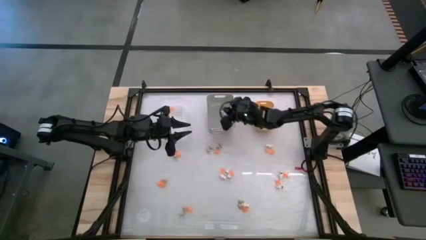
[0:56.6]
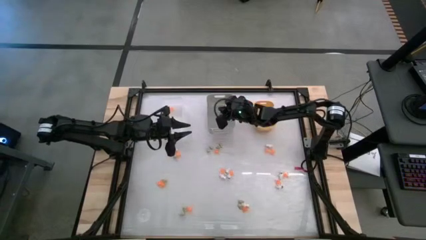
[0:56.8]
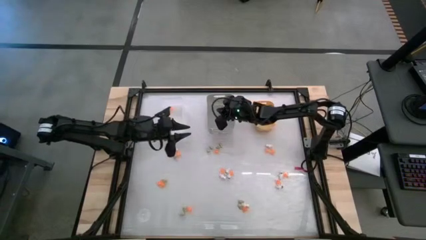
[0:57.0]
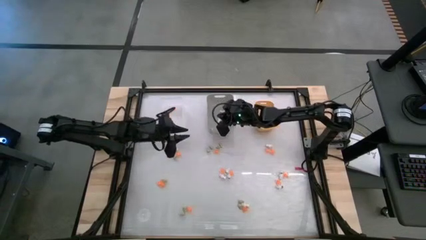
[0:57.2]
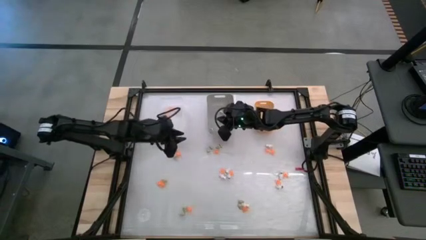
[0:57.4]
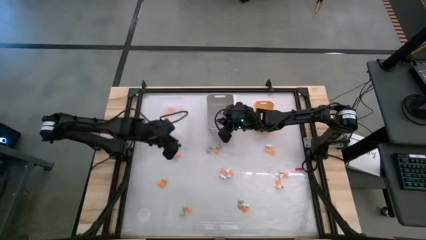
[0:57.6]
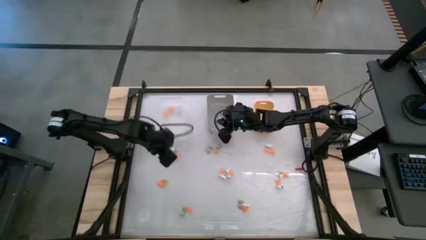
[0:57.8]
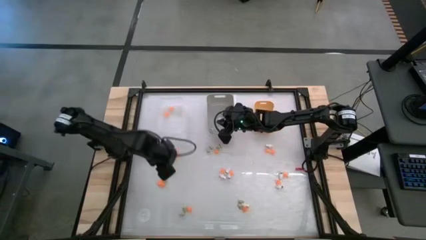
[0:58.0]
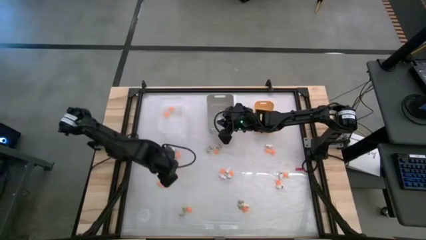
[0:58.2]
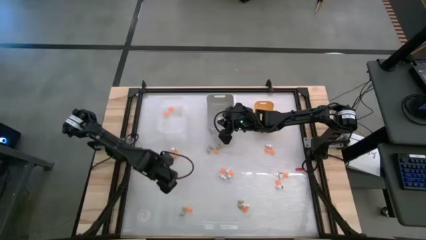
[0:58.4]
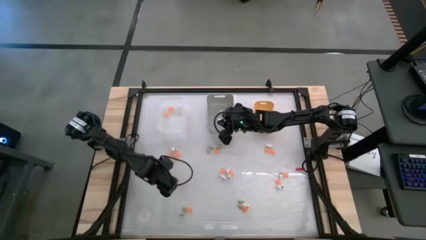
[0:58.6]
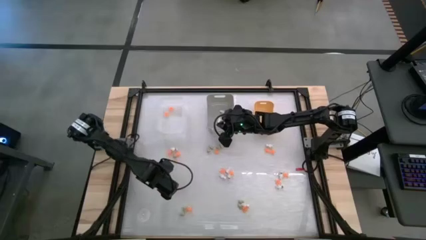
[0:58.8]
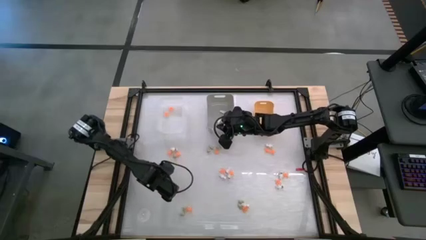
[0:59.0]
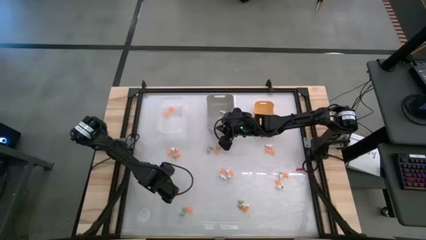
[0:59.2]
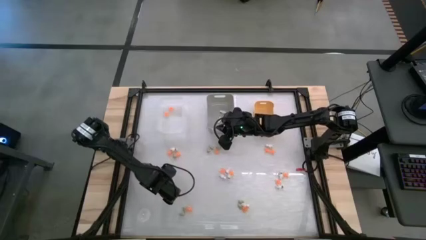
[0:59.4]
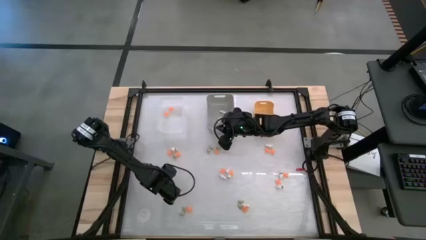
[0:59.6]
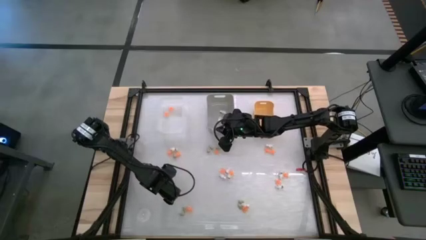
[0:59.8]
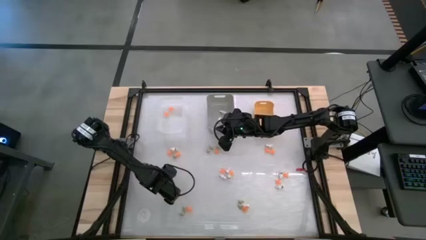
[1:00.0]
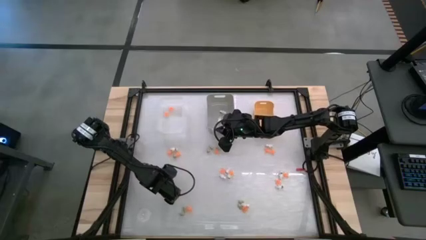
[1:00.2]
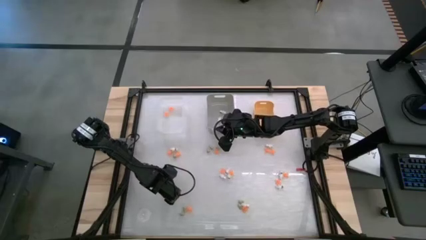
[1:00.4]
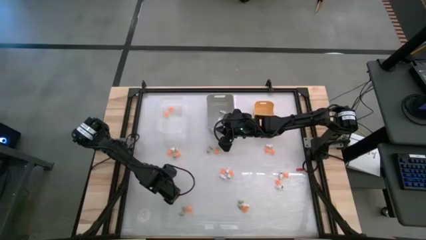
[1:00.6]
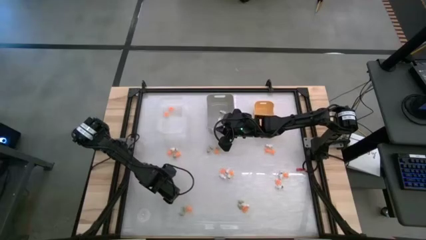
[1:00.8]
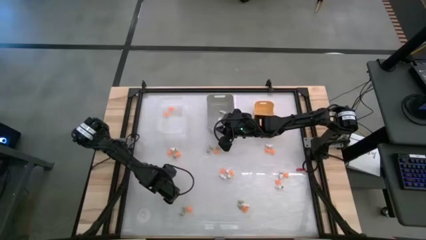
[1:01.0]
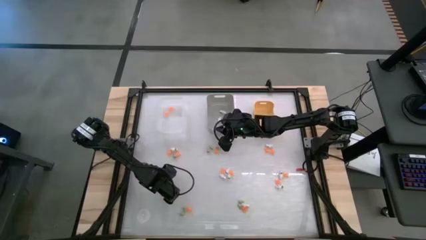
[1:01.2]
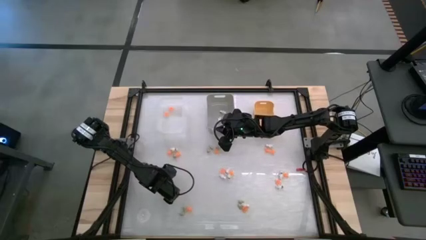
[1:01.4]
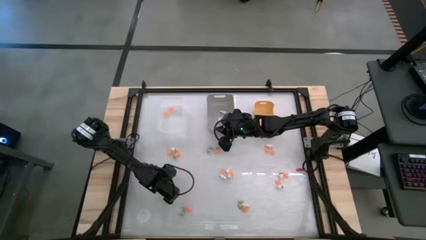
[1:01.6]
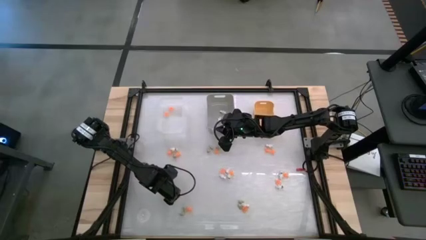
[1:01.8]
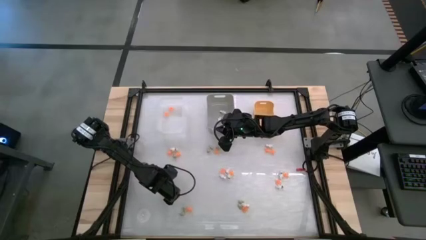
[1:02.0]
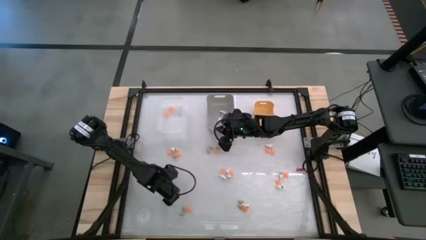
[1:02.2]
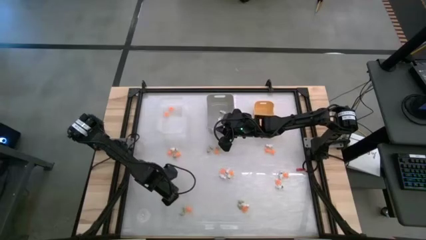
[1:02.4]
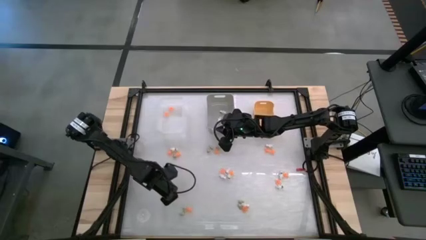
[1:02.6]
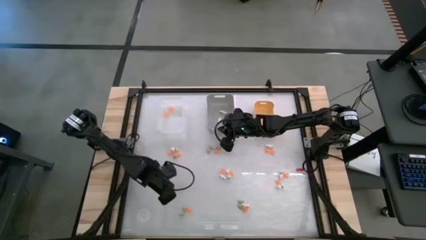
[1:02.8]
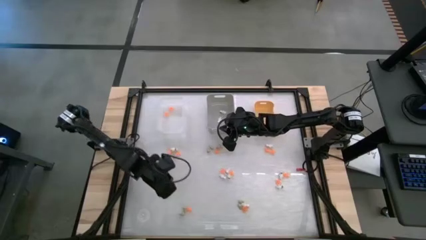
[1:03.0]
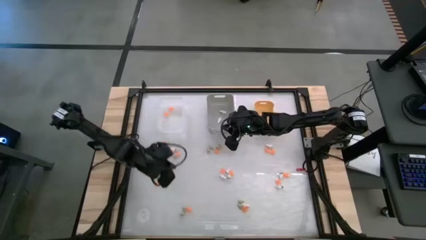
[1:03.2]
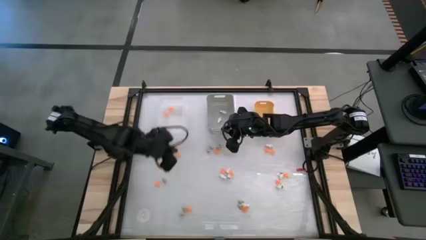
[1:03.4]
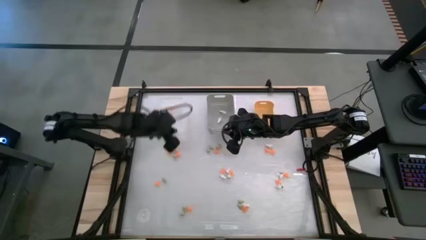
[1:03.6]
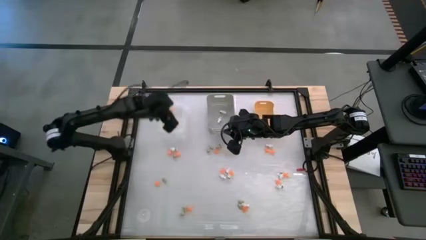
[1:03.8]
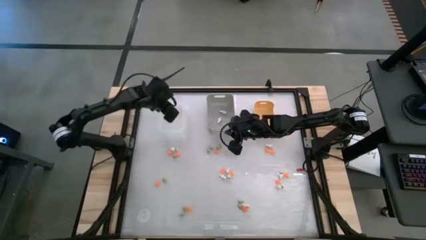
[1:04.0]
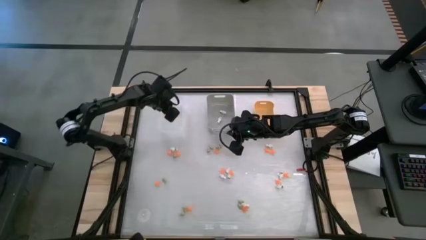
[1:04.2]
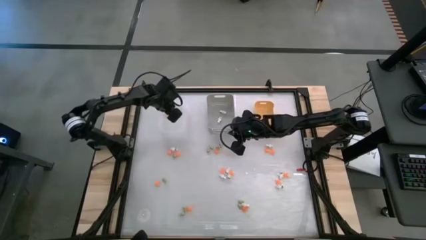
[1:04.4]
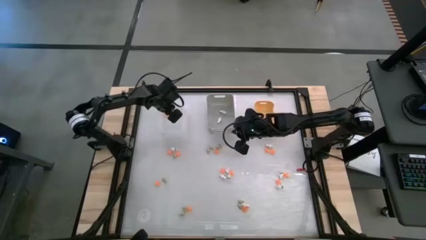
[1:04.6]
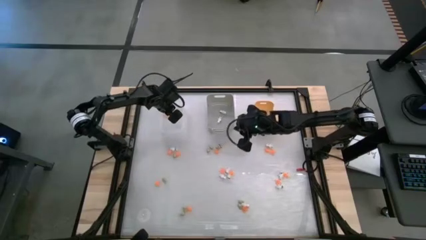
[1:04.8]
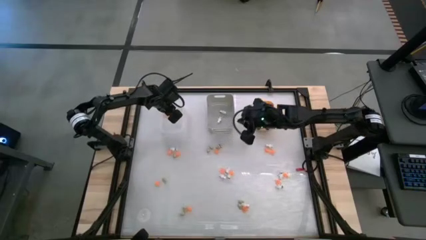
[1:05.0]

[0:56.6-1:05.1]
Task: Sort Halloween decoration
Put the orange spider toy into the transparent white bin

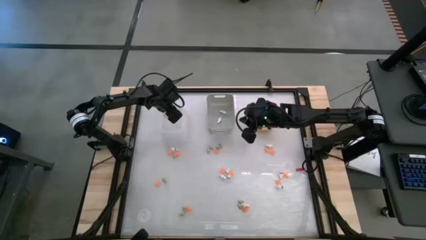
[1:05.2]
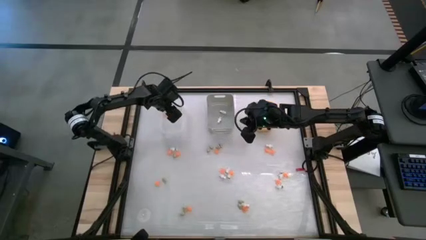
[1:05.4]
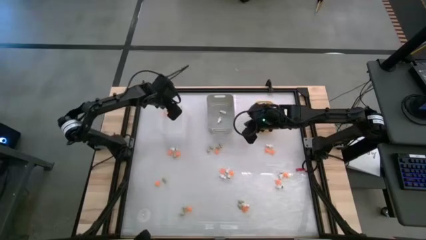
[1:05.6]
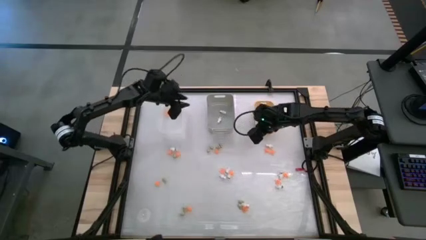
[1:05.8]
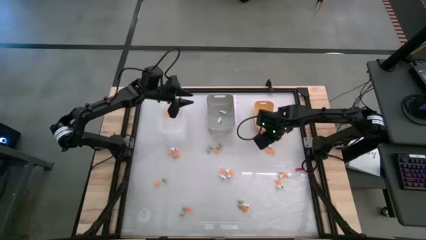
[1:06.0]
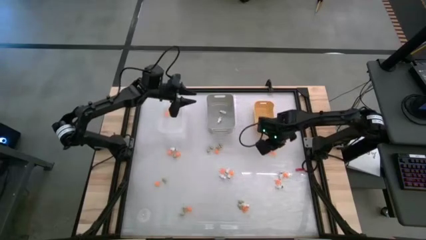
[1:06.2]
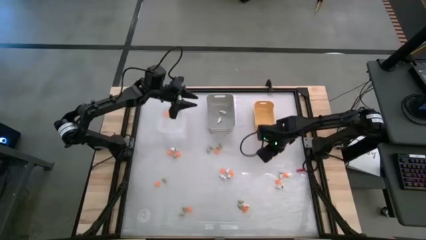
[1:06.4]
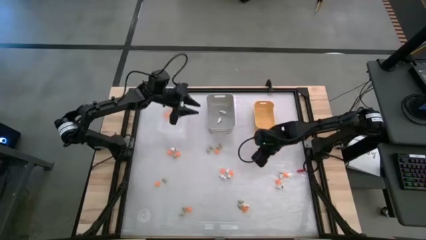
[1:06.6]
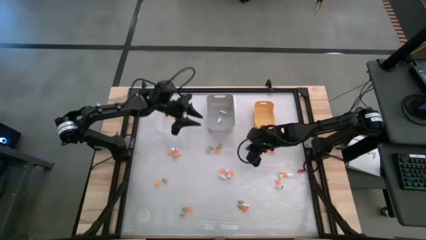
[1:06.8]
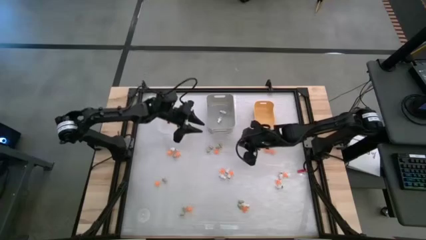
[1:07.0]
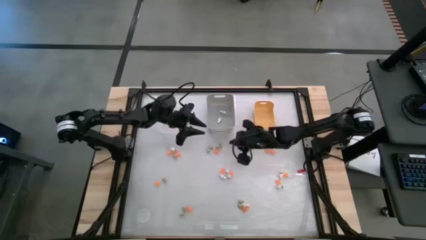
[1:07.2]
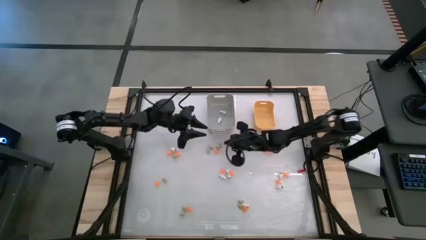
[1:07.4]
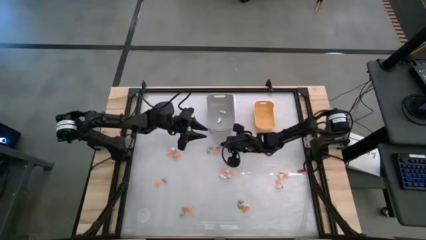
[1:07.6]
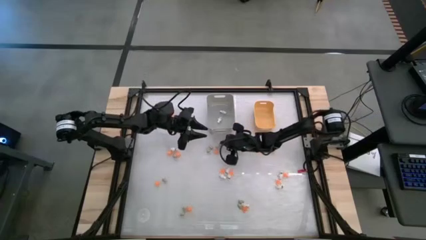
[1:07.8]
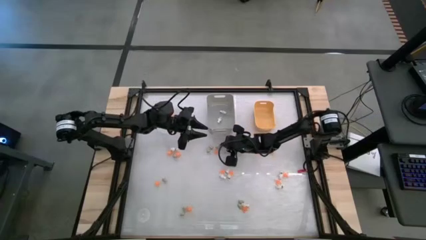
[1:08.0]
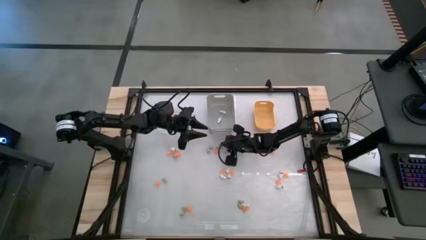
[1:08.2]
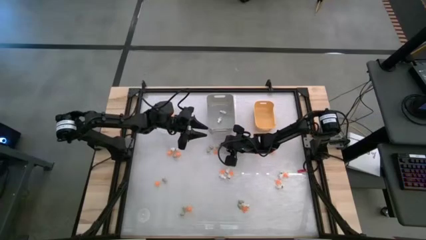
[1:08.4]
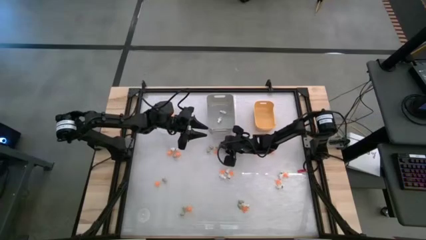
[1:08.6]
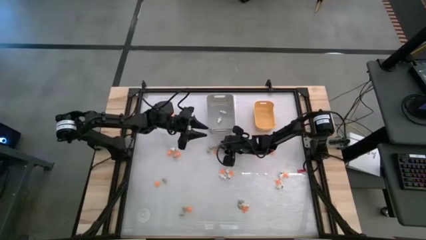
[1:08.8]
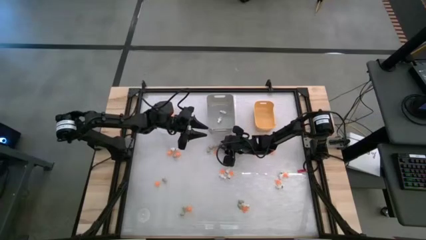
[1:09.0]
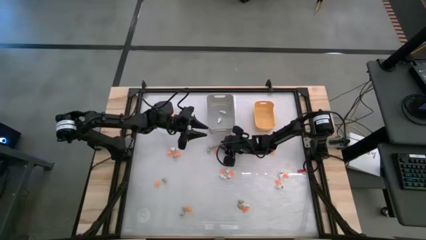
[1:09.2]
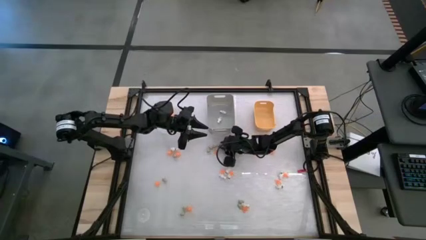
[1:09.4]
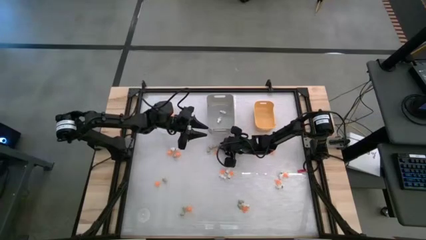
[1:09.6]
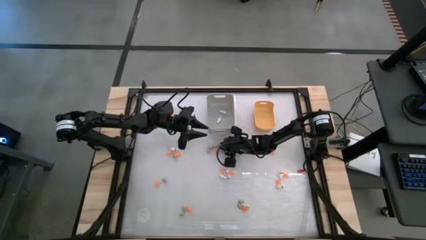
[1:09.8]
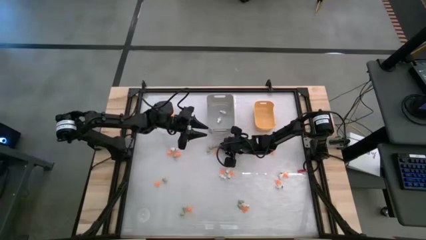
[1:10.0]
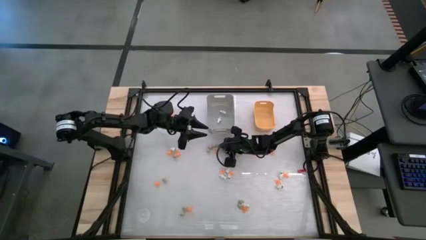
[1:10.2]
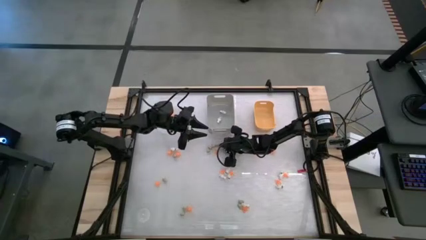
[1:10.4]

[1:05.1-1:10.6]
Put the cream white skull toy into the yellow bin

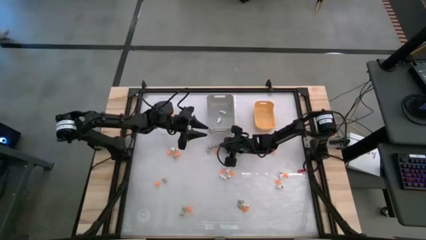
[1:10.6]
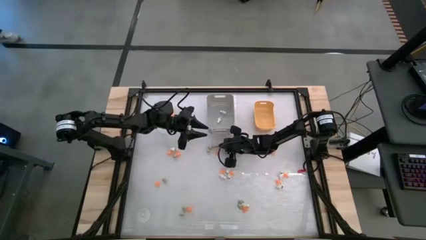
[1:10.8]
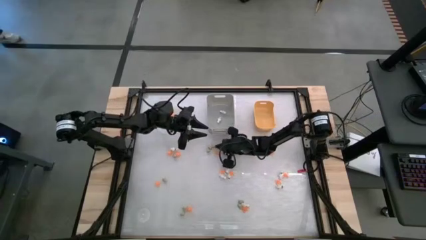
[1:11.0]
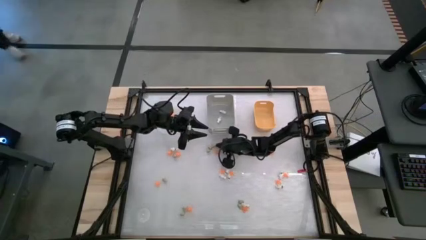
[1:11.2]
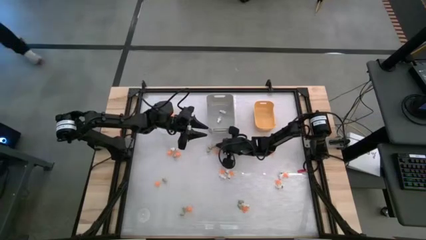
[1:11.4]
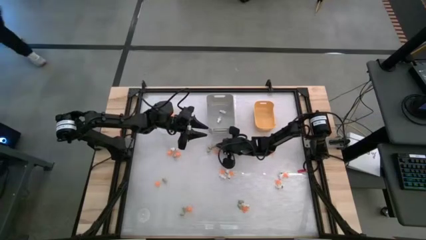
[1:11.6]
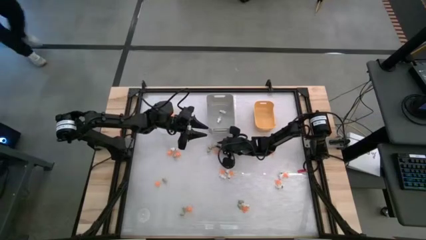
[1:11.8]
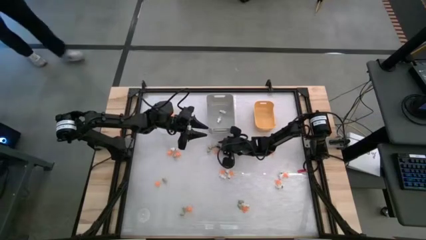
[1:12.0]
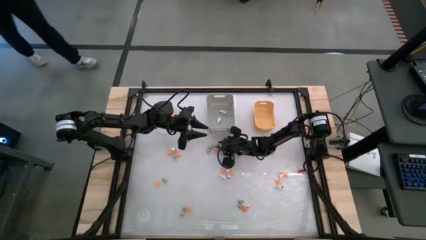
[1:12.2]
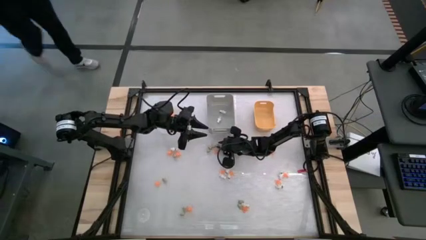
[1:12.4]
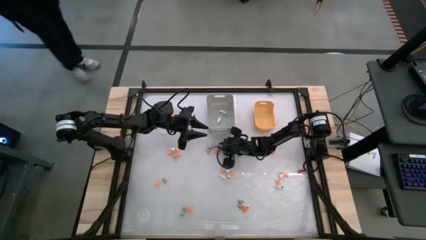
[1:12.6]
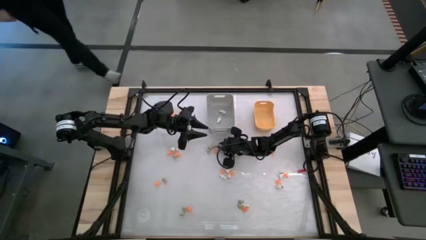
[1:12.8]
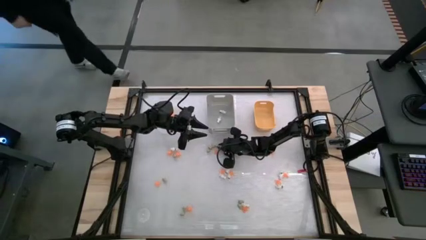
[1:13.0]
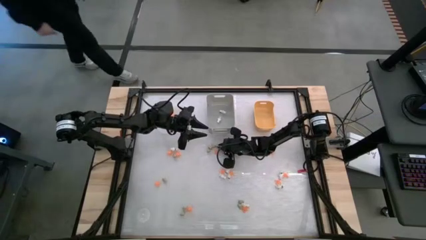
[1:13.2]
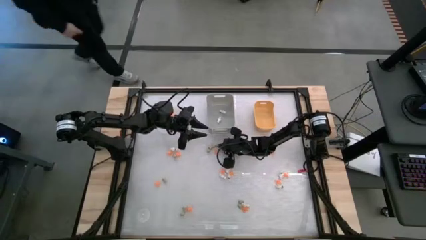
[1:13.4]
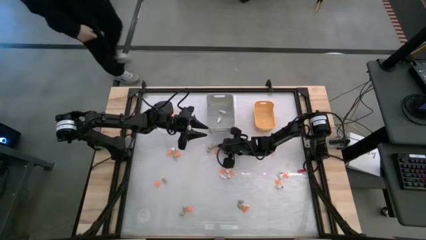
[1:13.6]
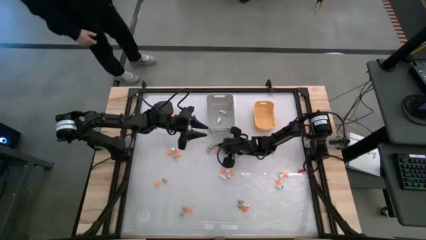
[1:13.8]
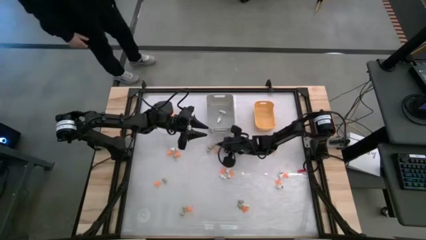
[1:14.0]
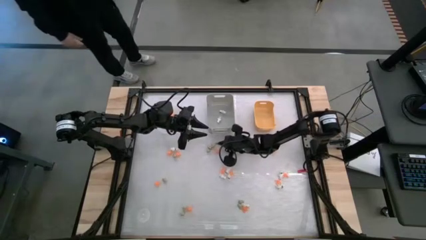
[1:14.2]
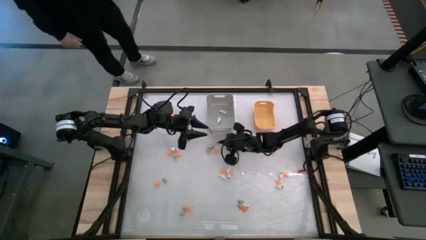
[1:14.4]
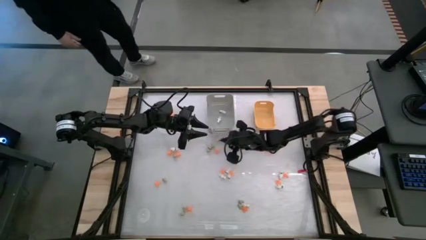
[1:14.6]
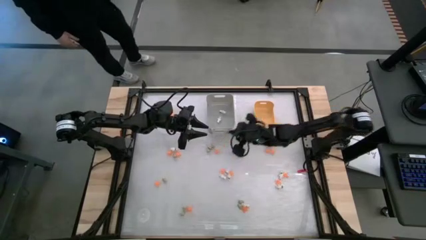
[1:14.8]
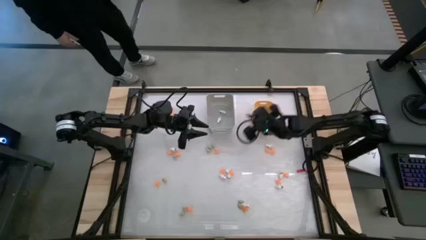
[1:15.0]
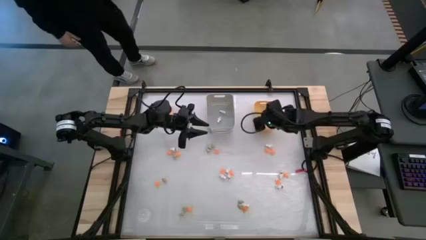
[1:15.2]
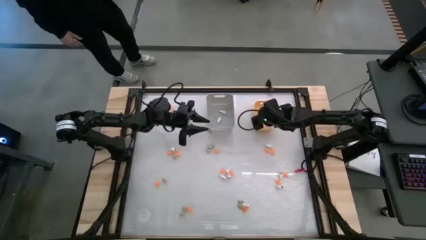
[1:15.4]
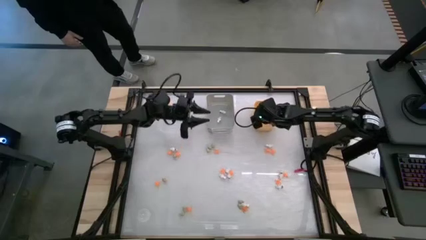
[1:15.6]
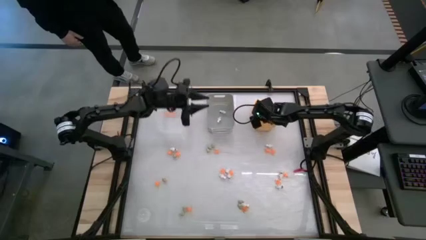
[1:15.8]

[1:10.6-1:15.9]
Put the cream white skull toy into the yellow bin
